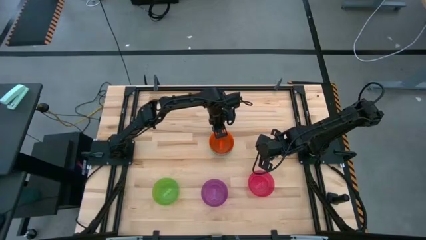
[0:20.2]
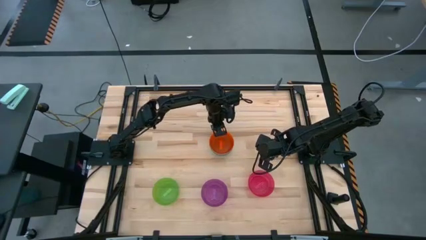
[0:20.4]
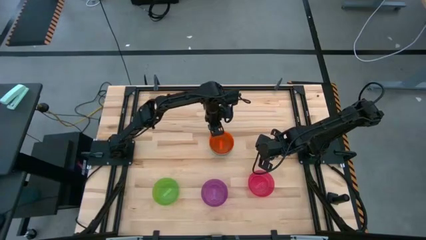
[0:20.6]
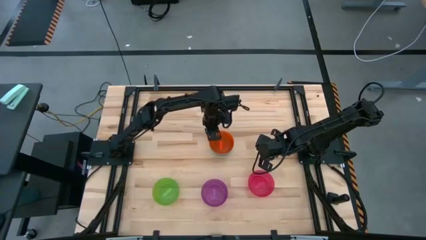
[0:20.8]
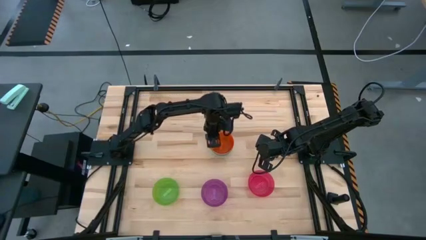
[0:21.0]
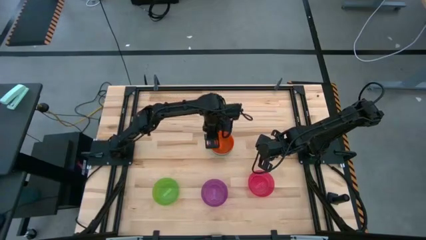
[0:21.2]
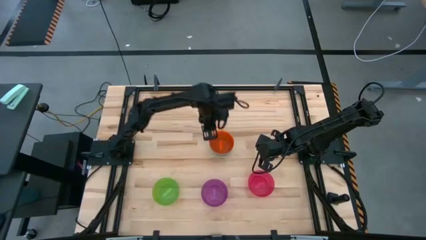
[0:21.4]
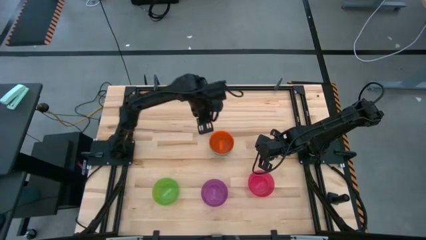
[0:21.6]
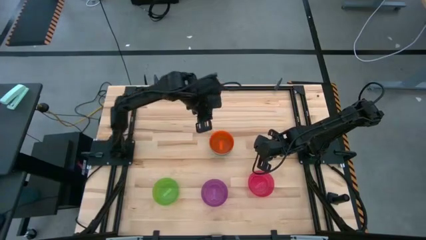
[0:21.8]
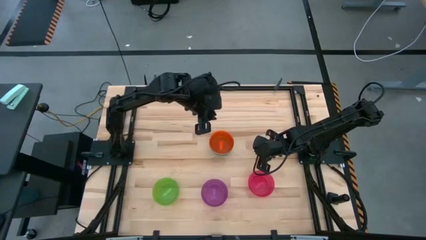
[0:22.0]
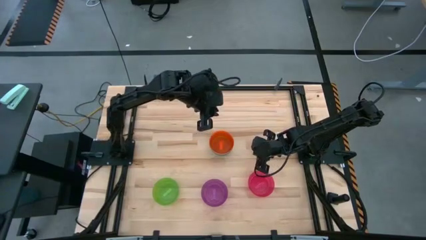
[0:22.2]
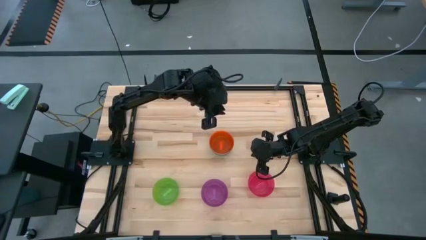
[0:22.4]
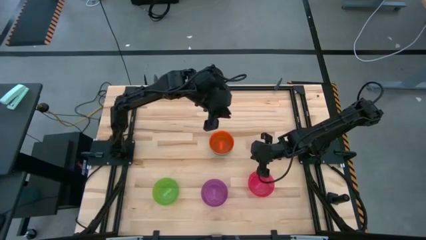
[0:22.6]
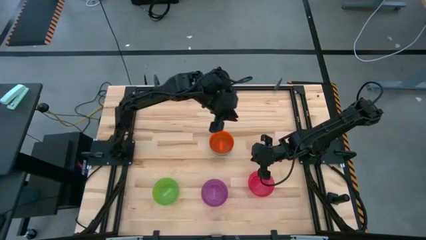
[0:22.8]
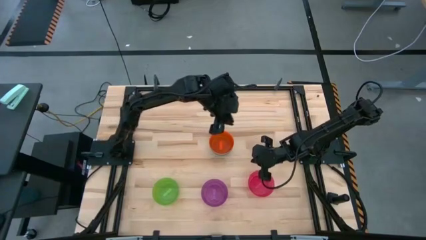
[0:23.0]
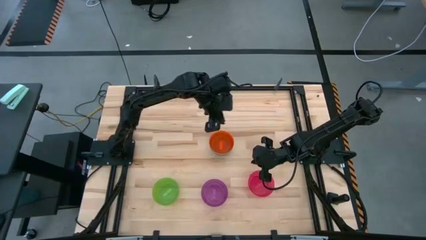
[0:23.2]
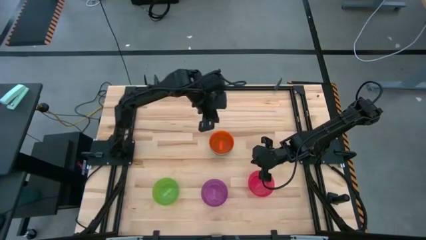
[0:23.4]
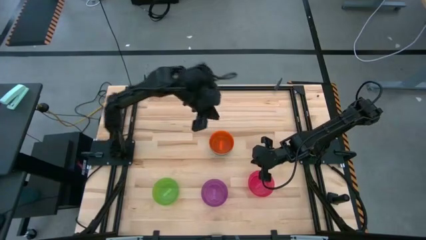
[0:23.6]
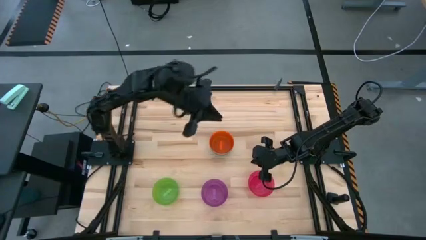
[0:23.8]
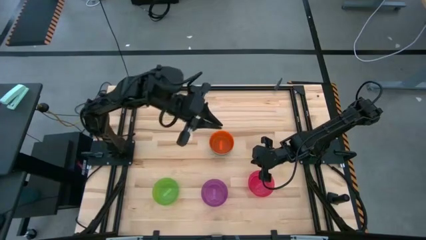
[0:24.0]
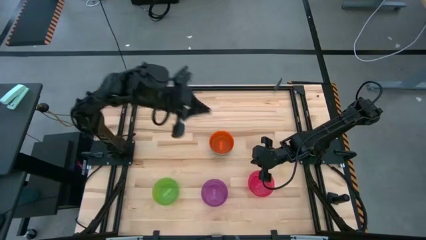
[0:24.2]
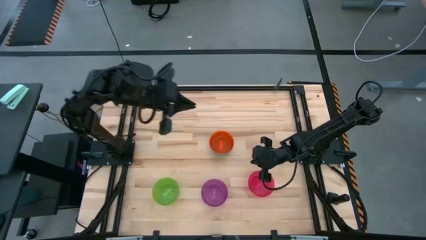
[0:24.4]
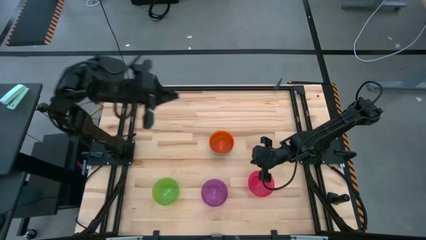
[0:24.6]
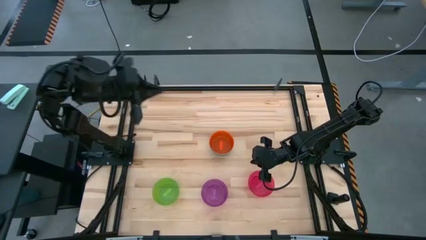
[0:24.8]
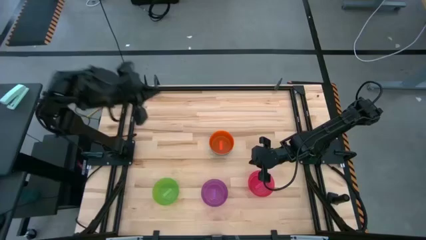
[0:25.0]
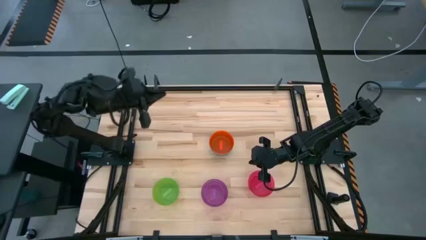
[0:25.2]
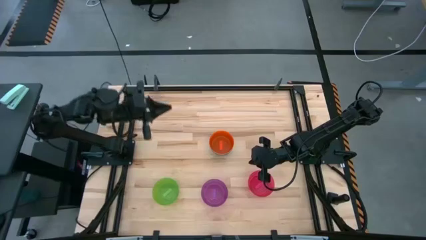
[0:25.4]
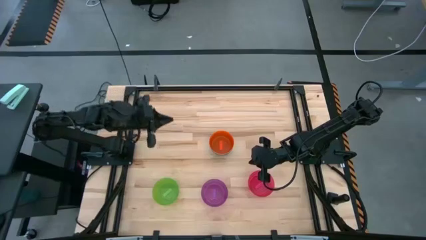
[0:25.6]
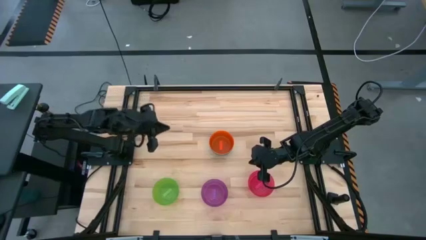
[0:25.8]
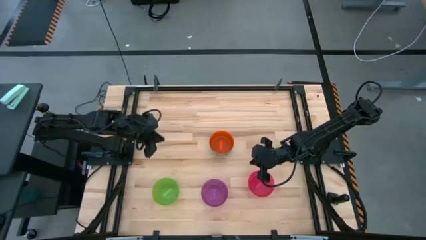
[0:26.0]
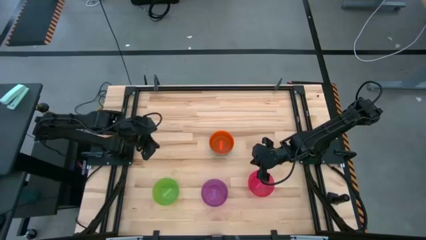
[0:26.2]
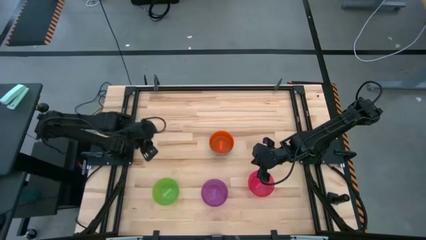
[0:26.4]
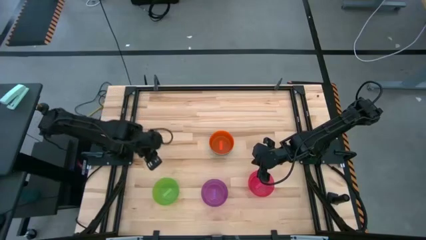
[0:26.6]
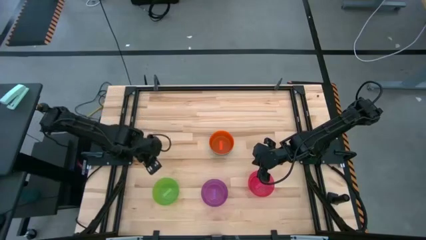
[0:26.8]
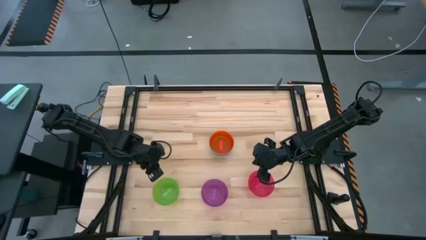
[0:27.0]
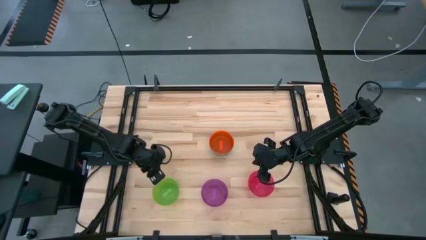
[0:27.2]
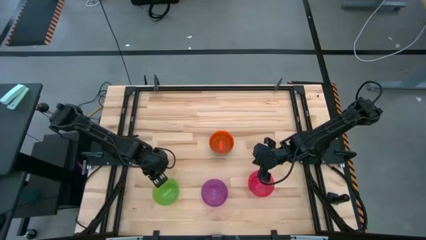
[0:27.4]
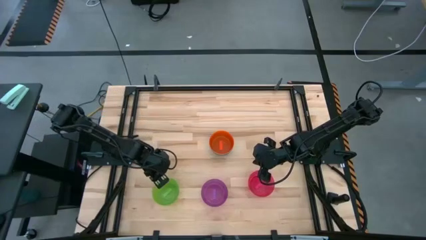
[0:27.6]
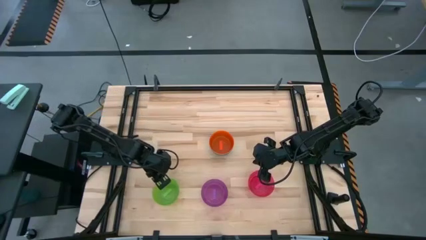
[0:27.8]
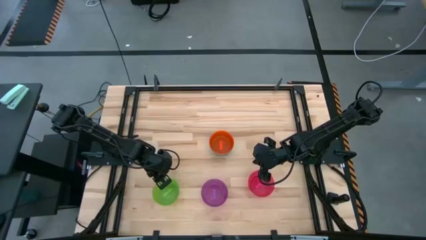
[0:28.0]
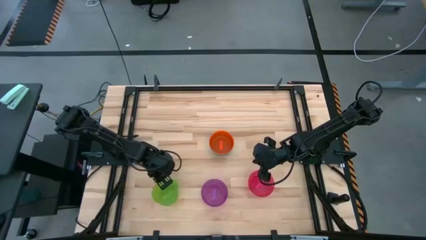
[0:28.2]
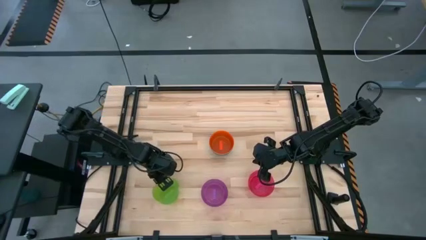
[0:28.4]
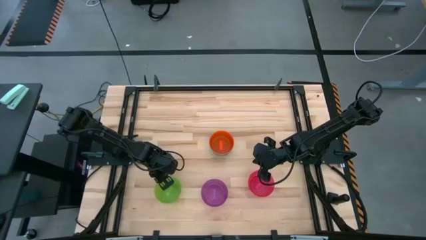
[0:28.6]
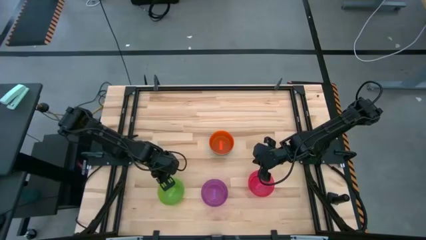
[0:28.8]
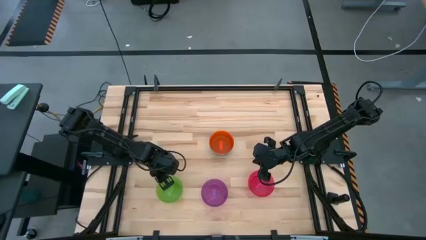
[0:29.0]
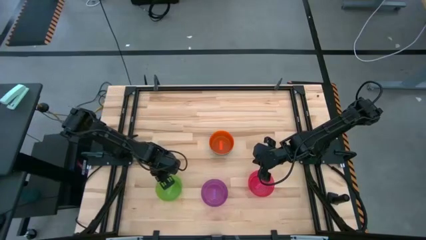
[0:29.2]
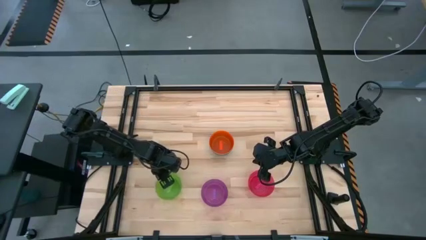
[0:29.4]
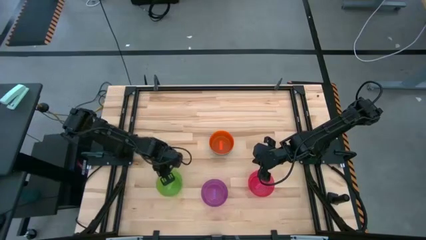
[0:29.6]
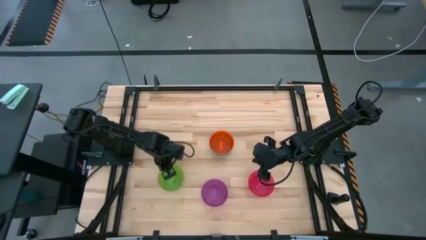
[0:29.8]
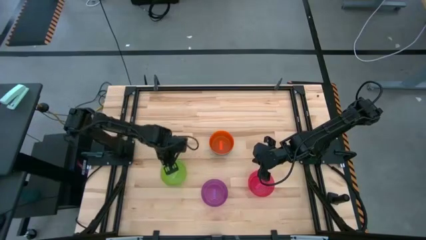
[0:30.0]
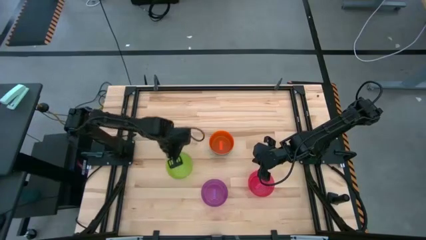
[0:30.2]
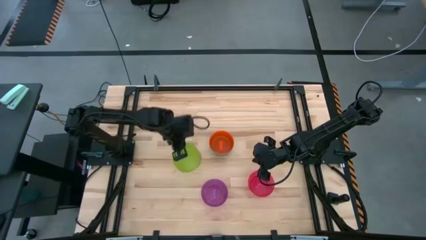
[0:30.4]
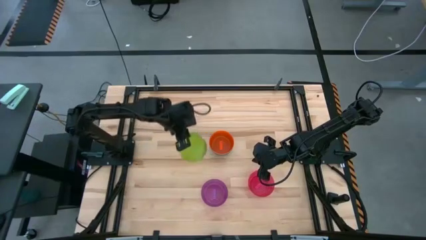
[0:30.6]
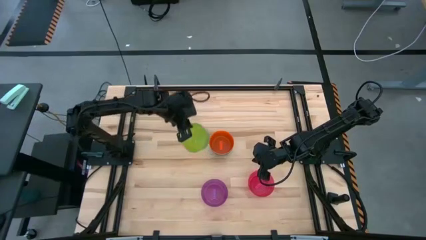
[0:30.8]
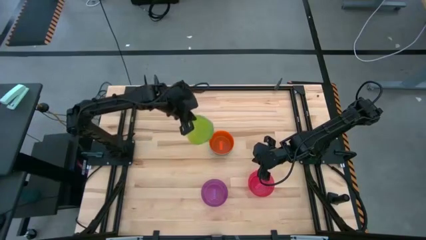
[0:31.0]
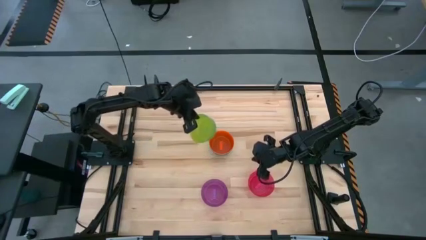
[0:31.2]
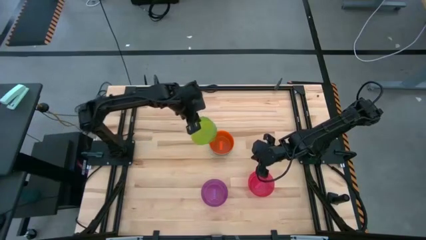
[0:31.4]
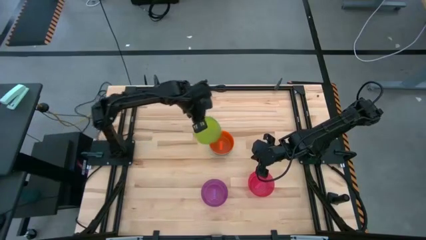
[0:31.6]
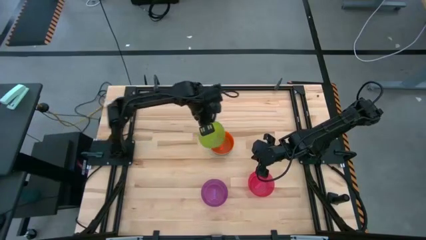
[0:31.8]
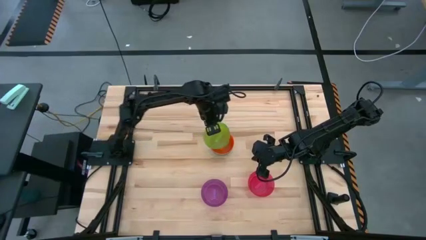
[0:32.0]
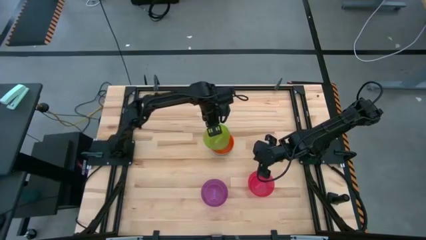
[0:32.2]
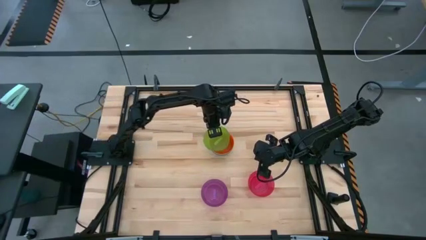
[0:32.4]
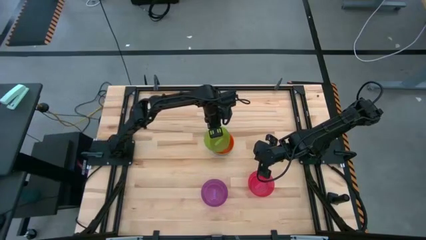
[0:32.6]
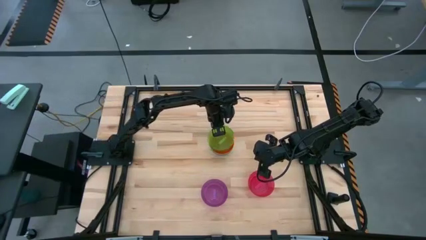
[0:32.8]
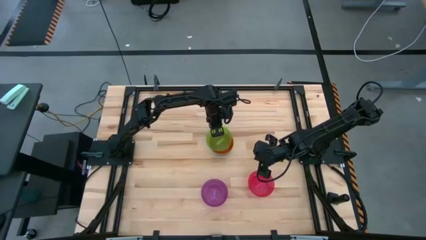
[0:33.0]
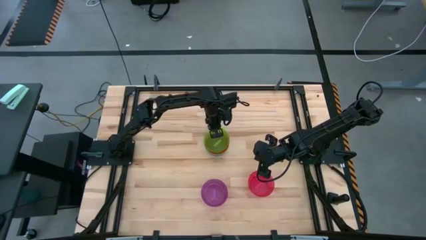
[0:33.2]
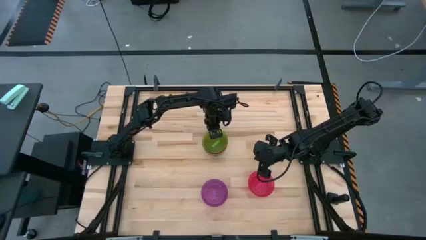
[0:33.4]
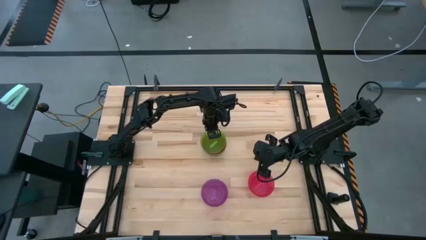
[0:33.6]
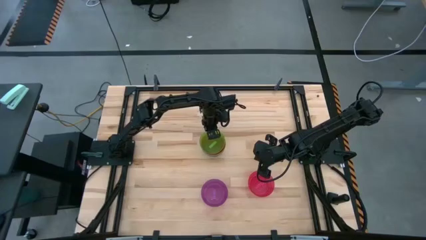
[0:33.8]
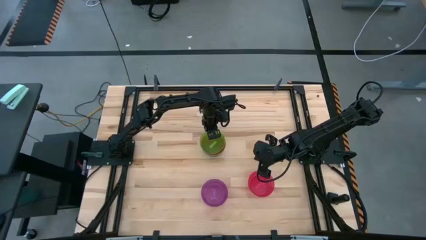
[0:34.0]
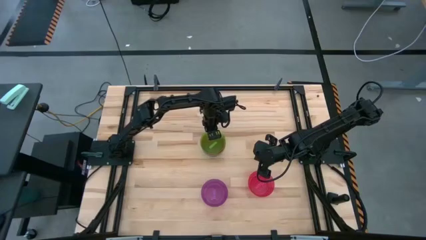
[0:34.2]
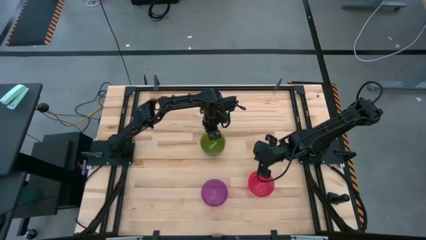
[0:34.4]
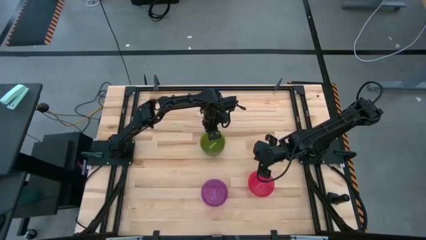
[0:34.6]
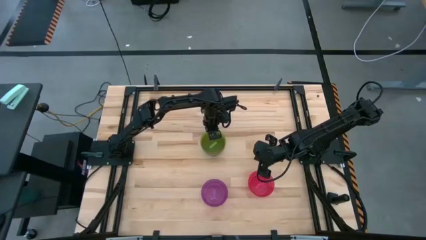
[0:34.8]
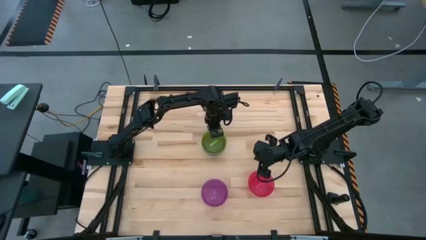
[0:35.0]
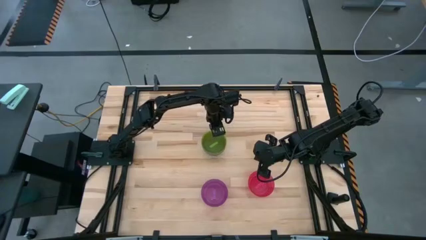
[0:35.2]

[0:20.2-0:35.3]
Task: Nest bowls inside each other
Stack the green bowl on top of the orange bowl
